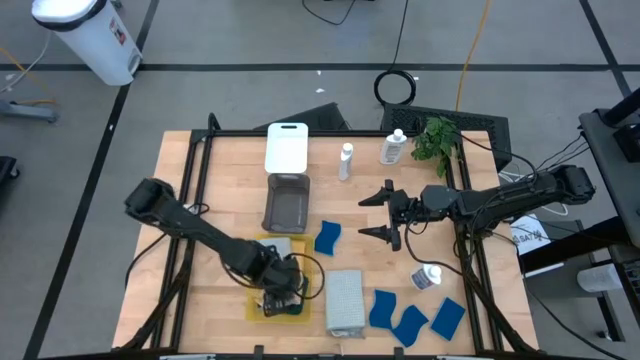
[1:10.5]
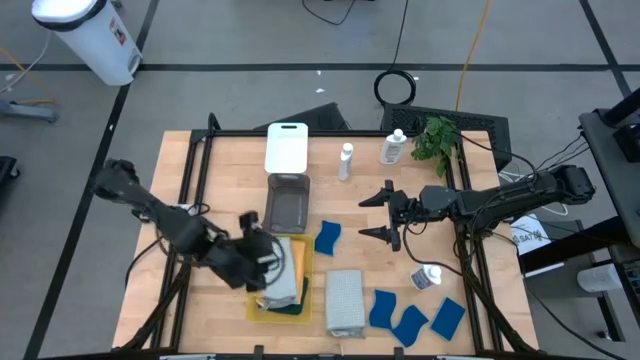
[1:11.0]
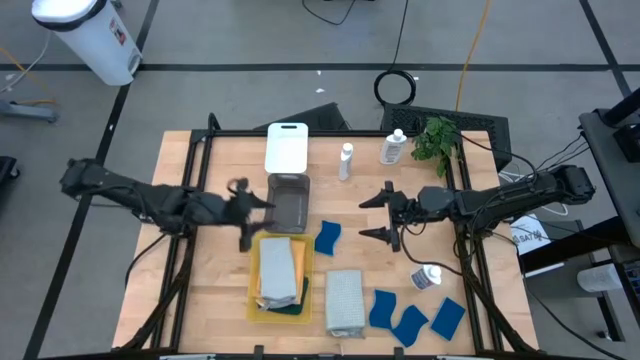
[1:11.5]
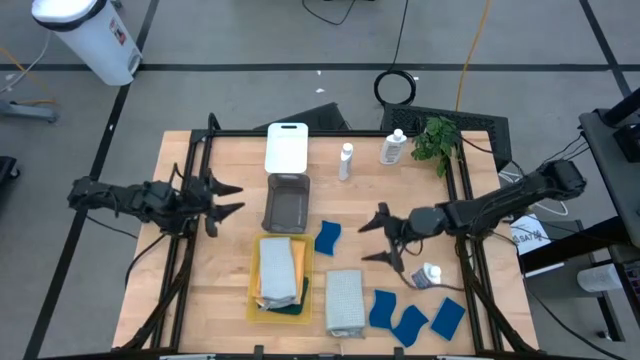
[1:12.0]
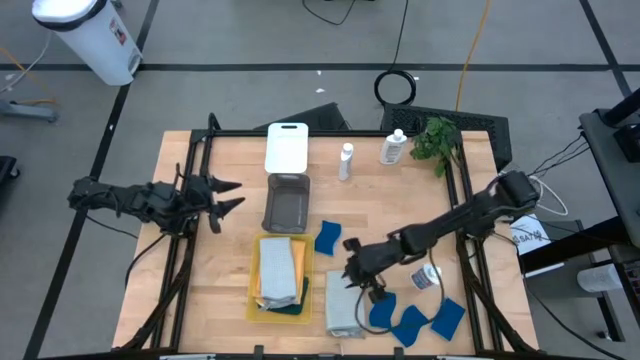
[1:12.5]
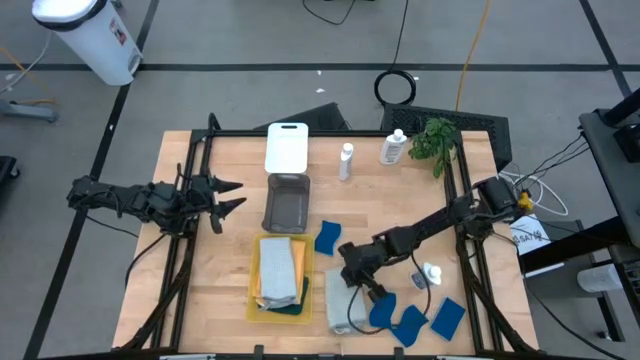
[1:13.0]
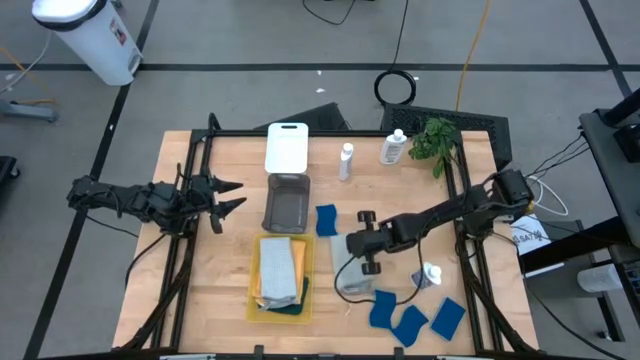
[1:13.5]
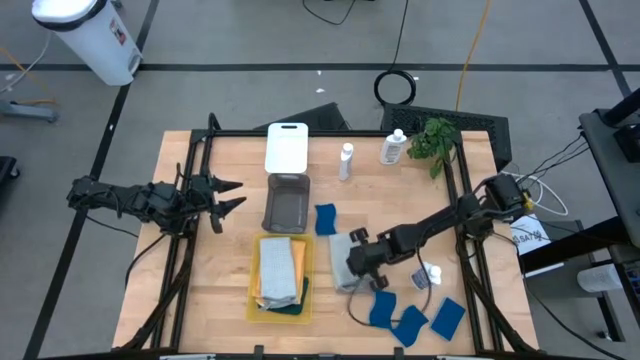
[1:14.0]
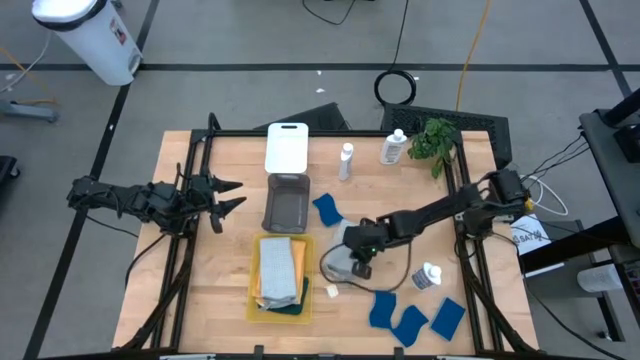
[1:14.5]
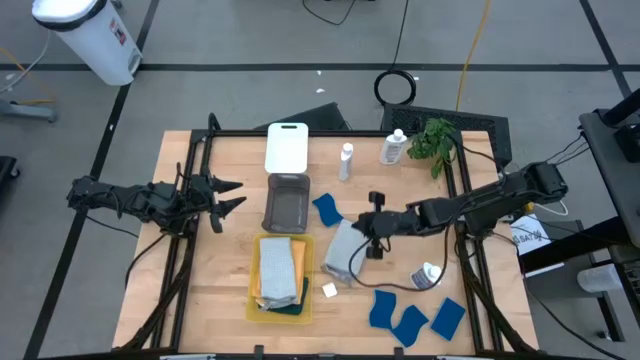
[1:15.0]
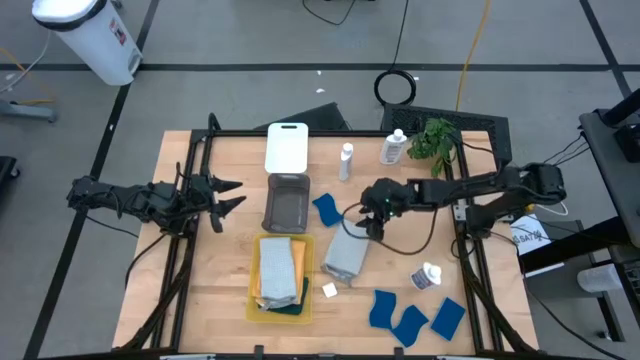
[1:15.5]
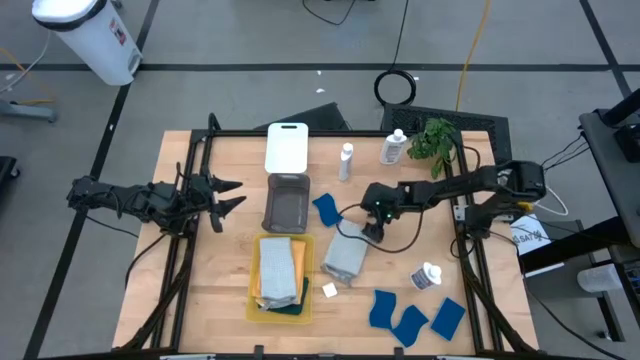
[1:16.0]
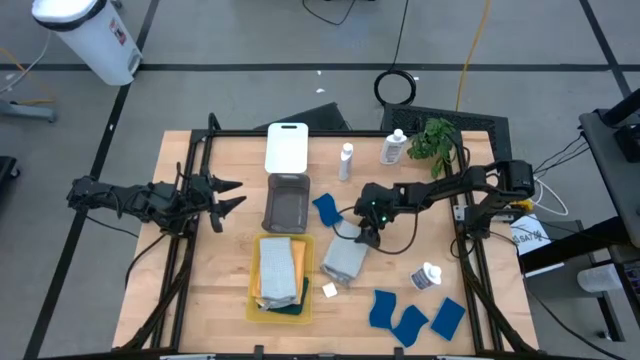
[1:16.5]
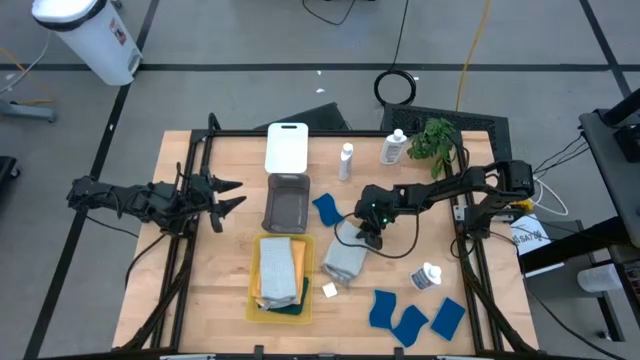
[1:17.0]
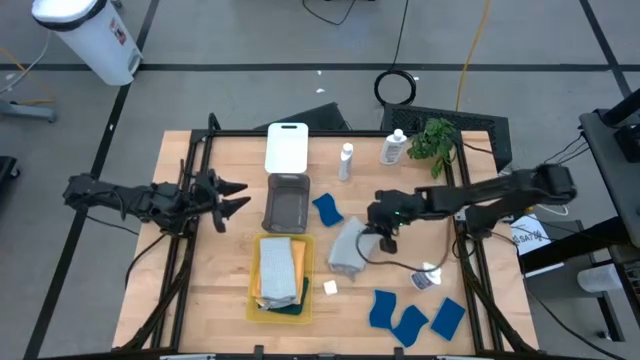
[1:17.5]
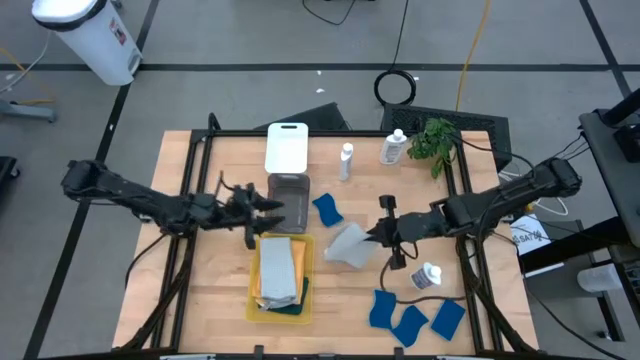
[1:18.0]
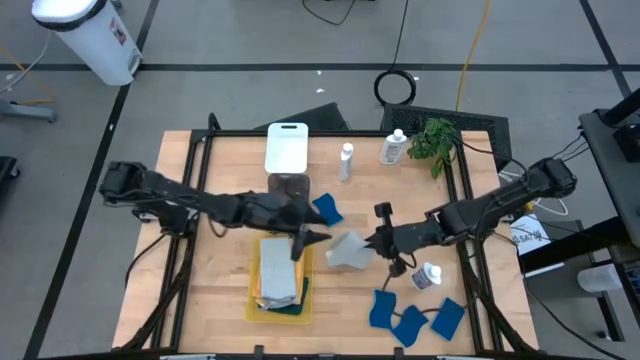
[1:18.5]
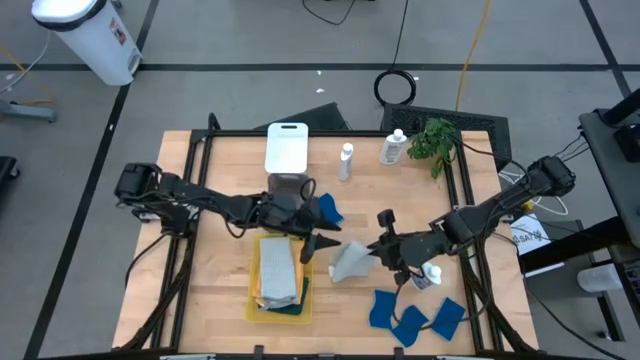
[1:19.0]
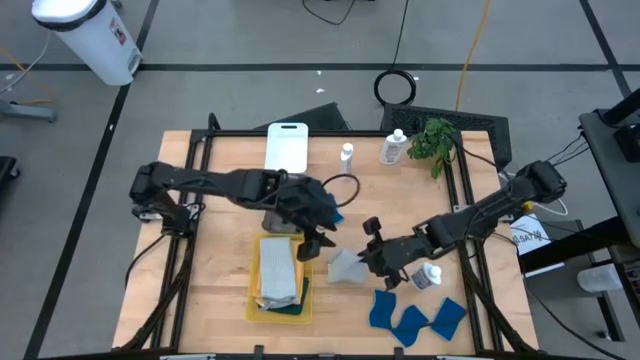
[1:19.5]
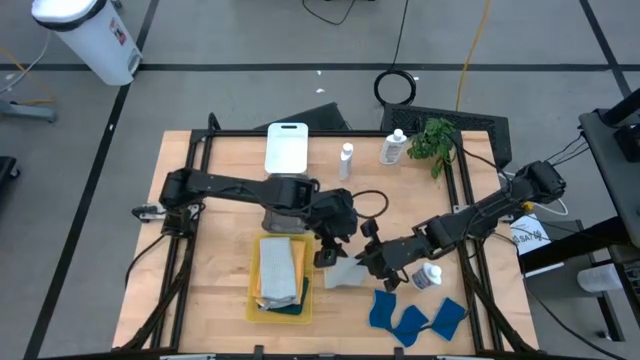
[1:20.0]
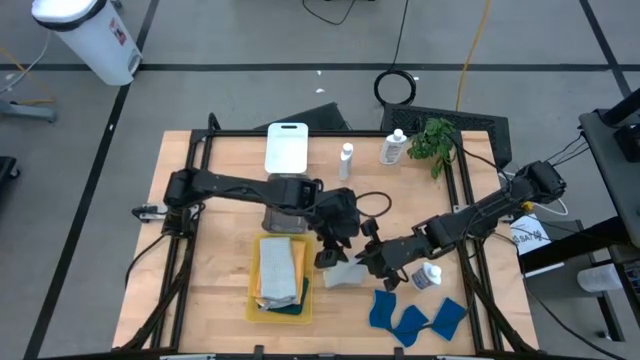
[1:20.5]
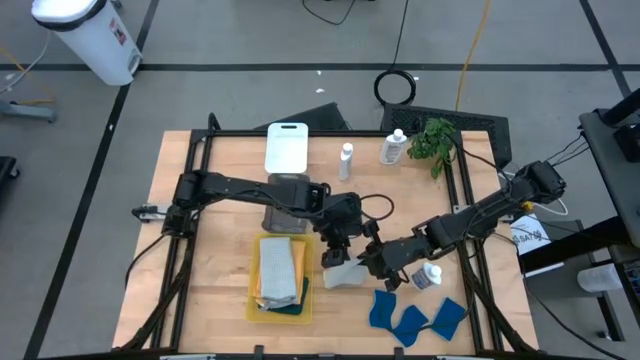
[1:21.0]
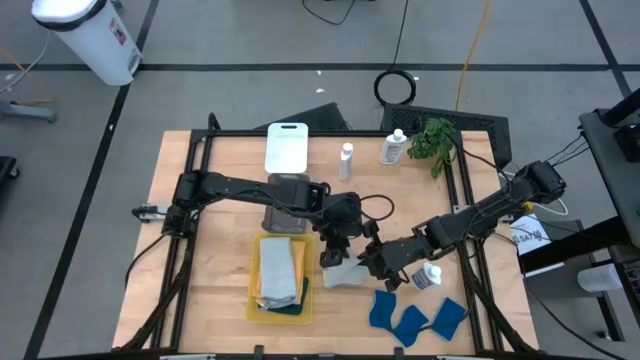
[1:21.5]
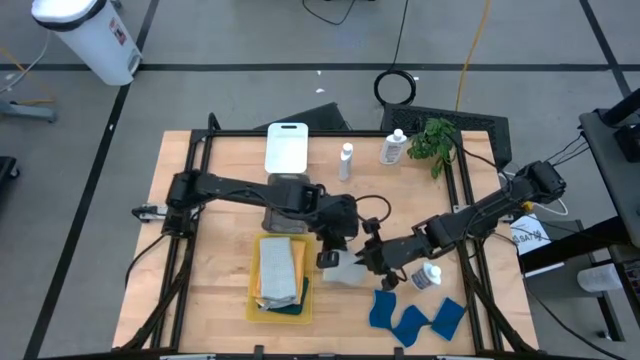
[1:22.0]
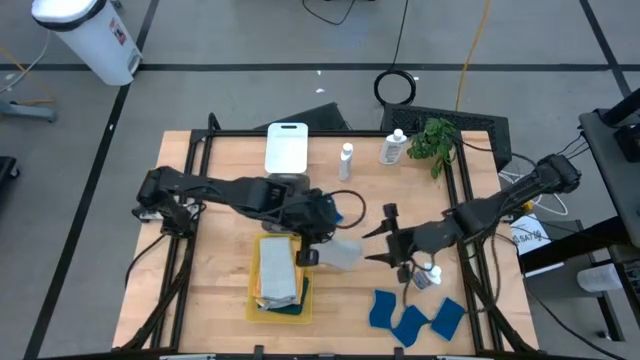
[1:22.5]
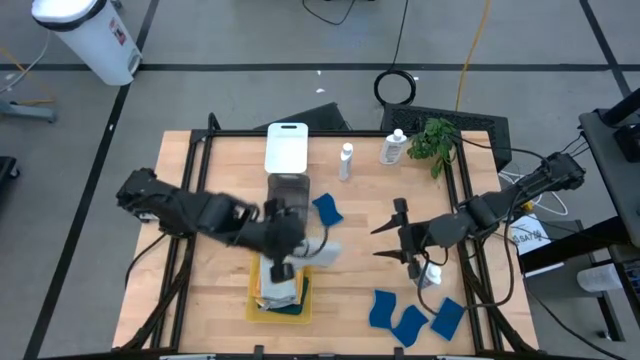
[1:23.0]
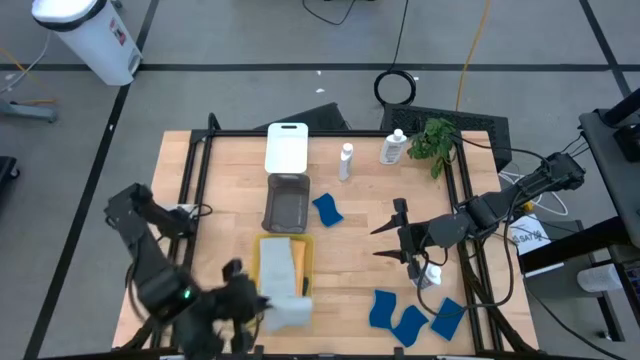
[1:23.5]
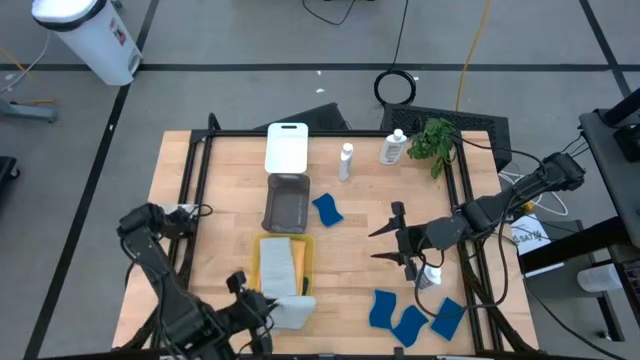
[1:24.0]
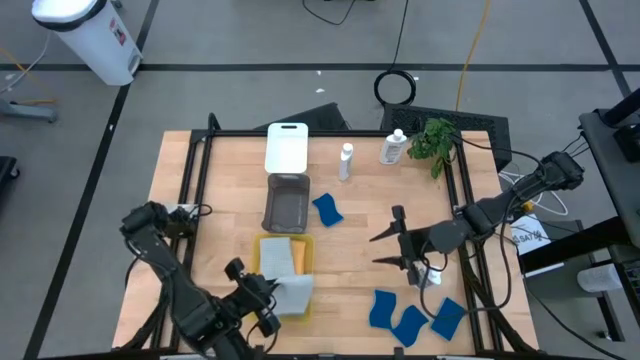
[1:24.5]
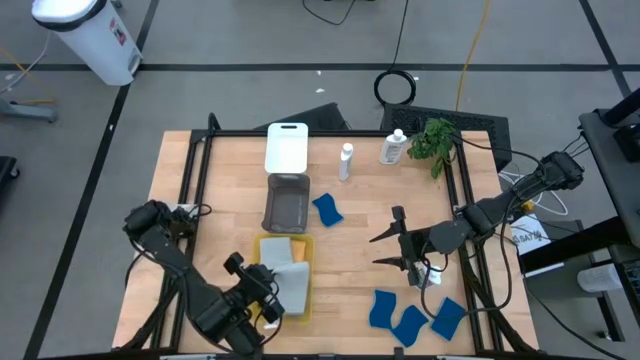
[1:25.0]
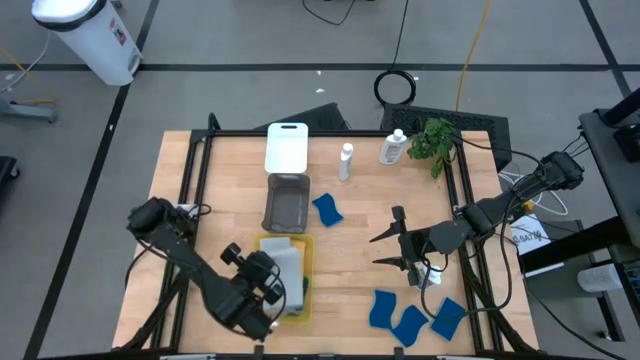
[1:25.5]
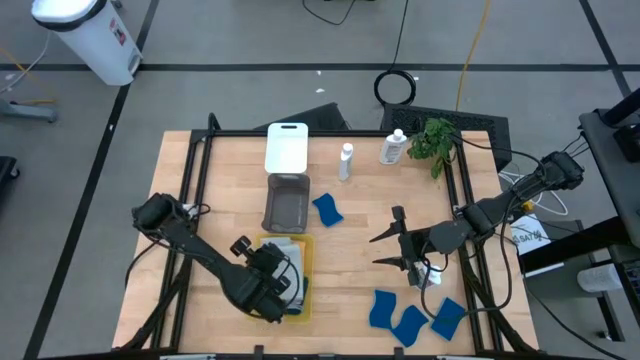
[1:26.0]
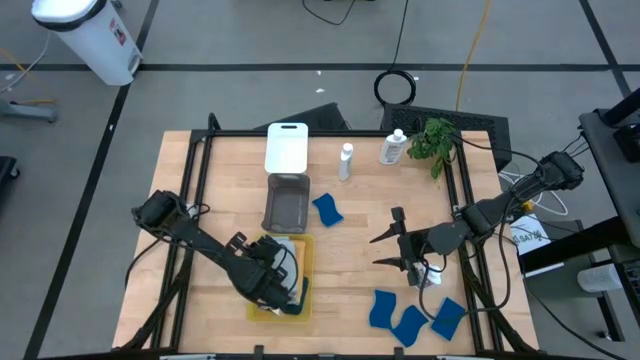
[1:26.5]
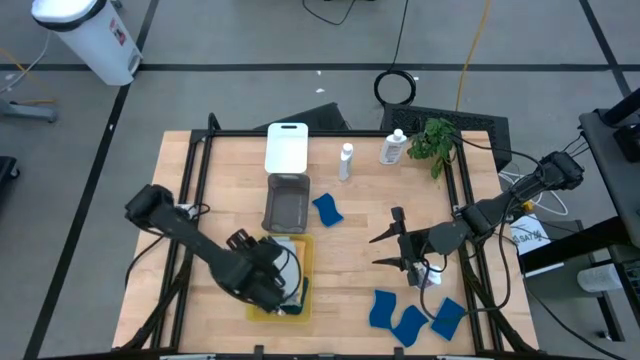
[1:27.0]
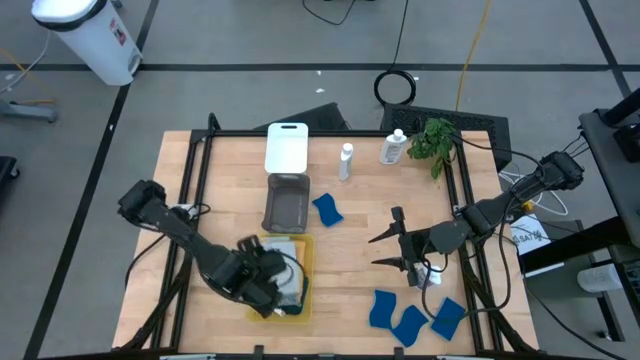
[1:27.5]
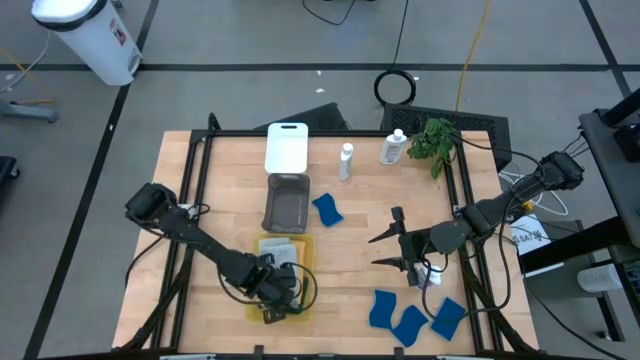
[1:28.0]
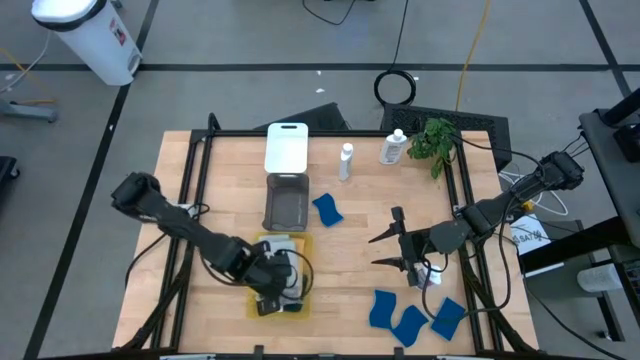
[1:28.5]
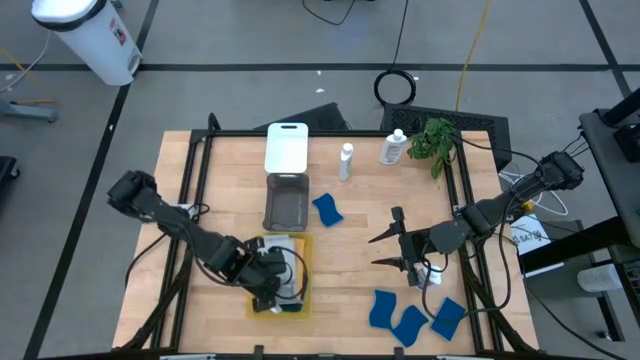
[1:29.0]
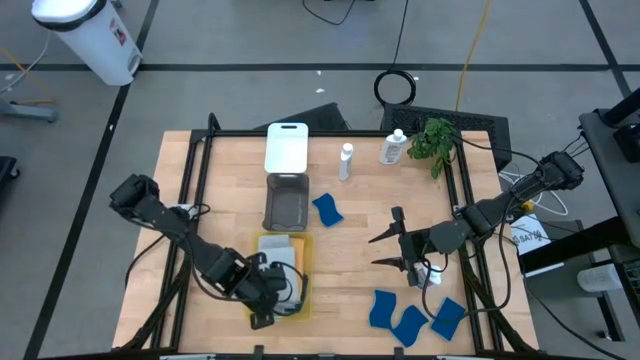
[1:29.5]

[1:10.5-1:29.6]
Task: Pick & Place Kitchen Items
Put the gray towel into the yellow bin
